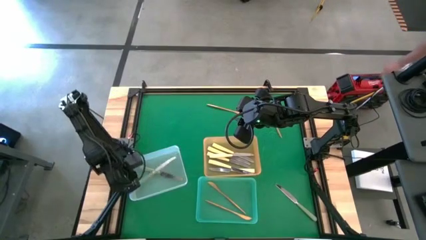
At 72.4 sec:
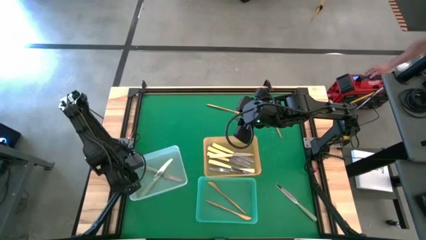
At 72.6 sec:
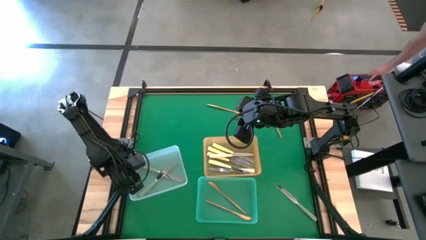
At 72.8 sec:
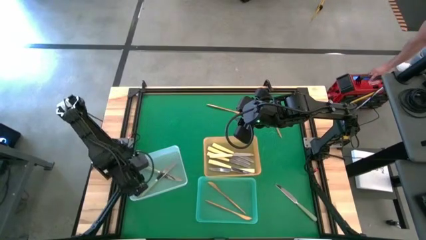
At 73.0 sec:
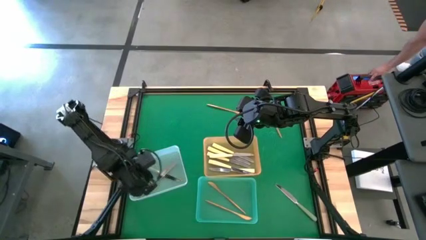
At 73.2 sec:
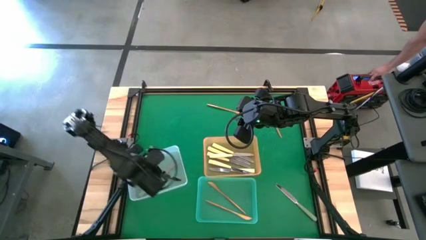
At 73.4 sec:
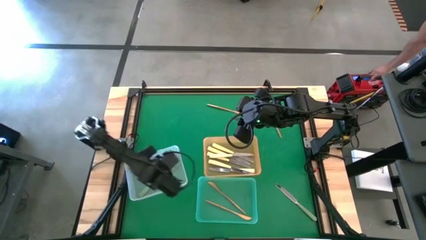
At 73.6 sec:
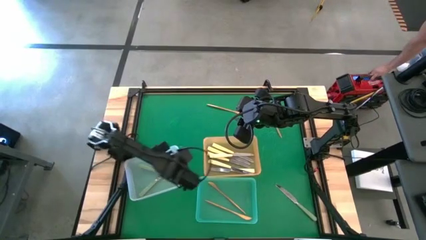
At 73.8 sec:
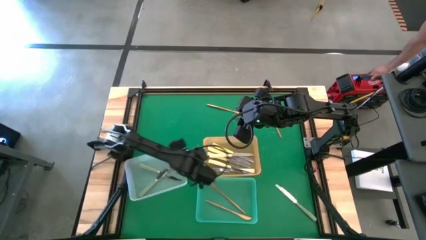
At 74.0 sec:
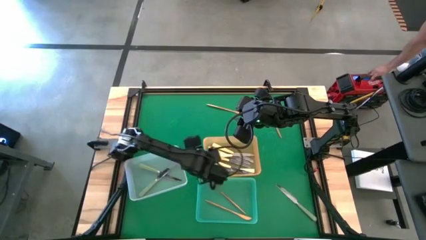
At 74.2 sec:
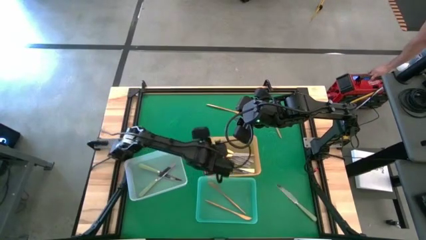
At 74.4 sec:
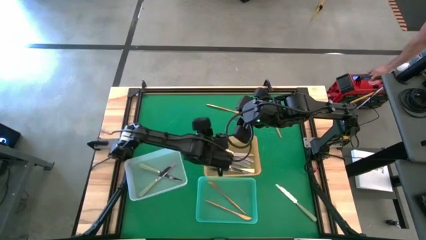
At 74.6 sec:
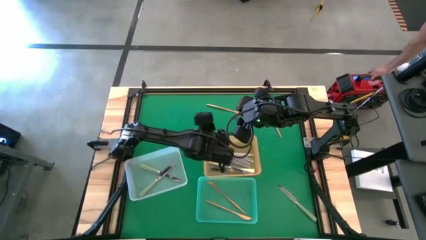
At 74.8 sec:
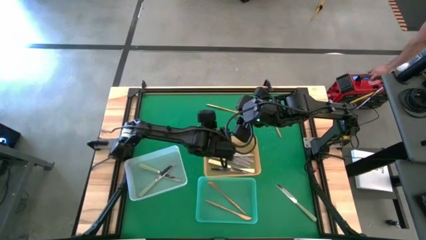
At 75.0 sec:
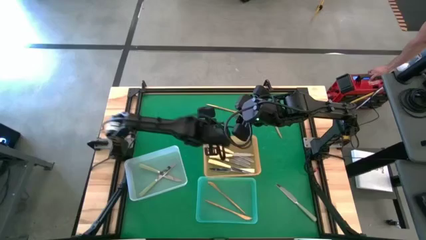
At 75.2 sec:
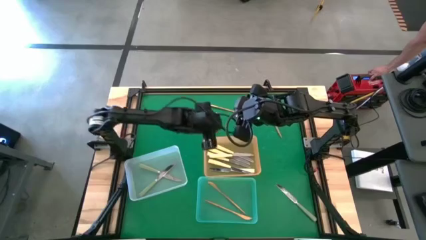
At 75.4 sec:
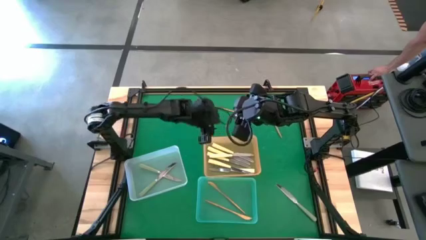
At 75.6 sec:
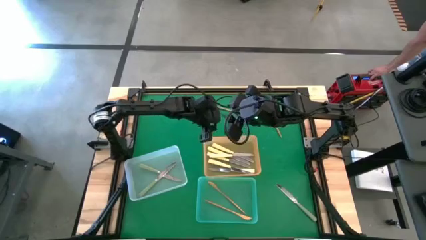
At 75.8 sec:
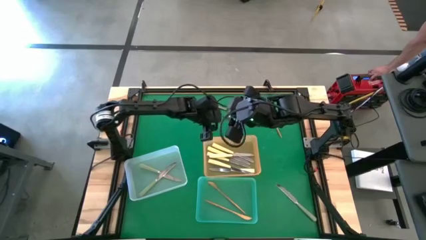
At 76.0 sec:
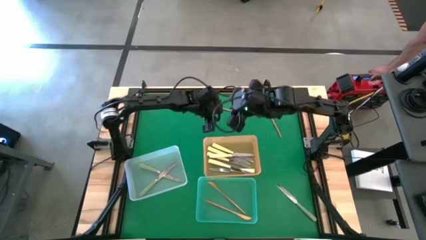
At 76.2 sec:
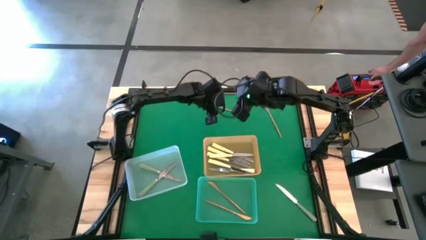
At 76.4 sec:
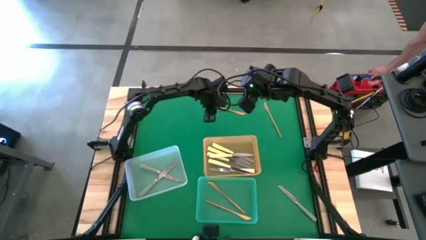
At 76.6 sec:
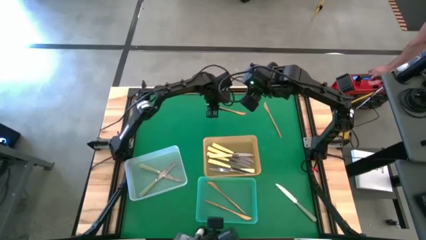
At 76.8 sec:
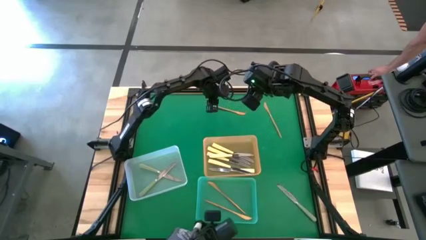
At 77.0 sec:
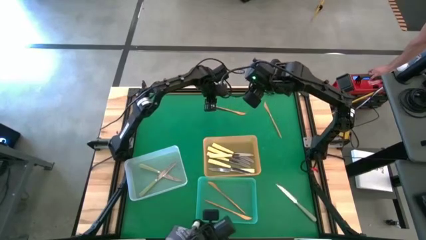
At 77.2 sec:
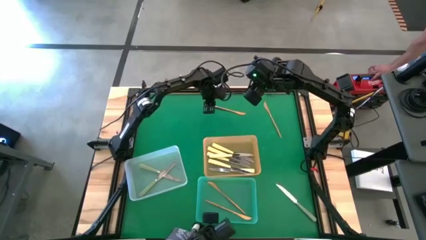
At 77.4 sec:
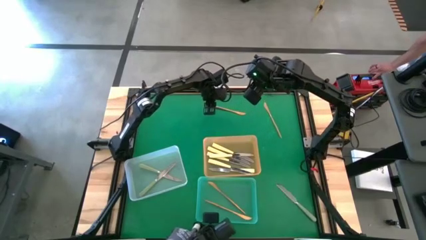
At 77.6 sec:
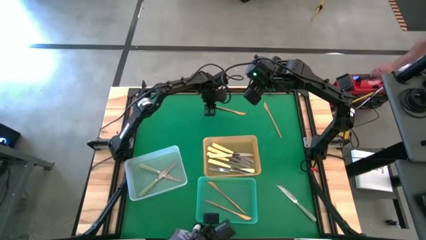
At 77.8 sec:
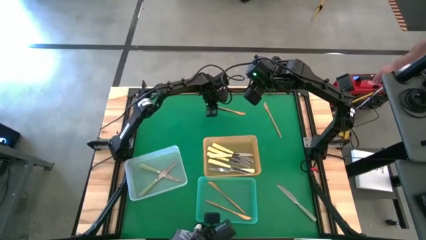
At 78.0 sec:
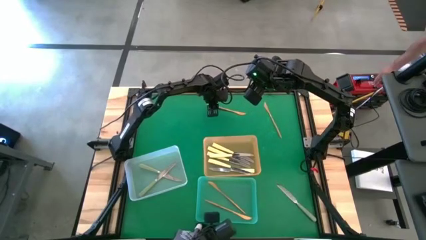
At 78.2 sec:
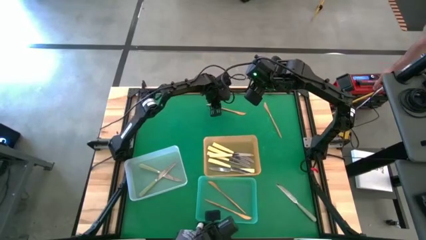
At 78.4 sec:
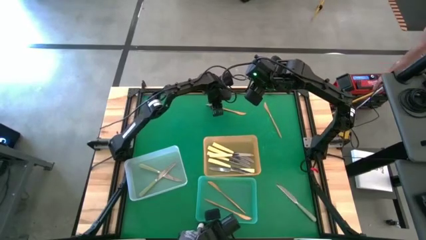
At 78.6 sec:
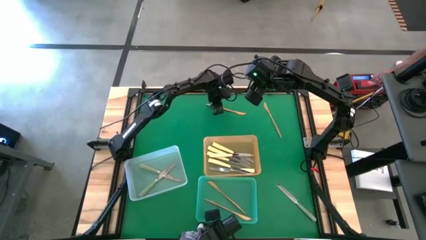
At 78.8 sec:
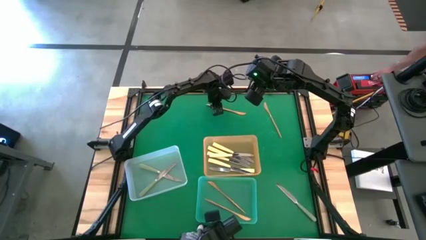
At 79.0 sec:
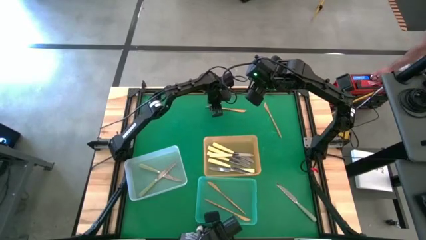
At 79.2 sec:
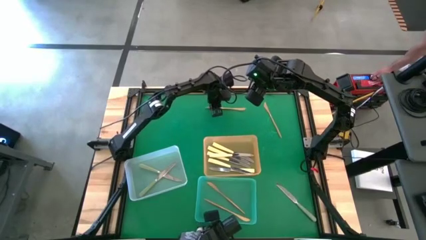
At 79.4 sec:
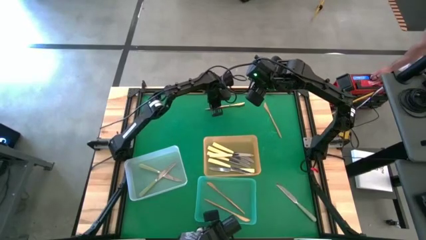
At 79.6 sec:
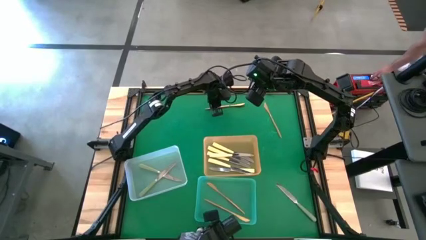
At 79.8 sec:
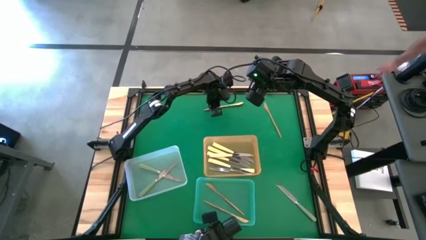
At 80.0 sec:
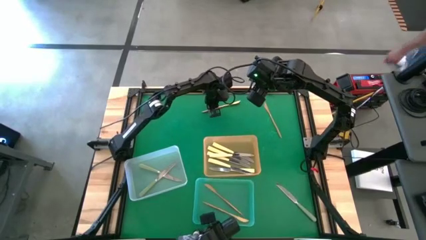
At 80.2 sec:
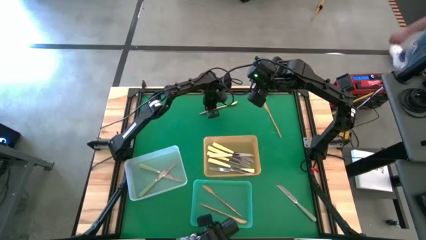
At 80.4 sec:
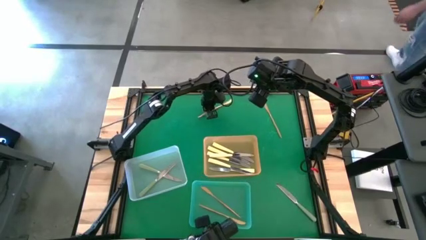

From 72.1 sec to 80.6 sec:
Task: Sort silverware by color (type)
Put the gold table knife into the blue bin

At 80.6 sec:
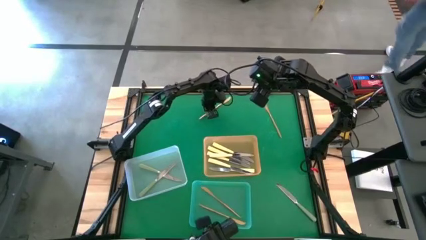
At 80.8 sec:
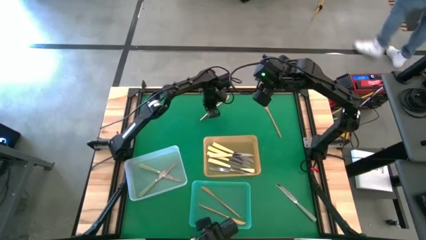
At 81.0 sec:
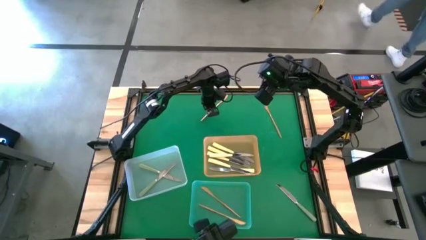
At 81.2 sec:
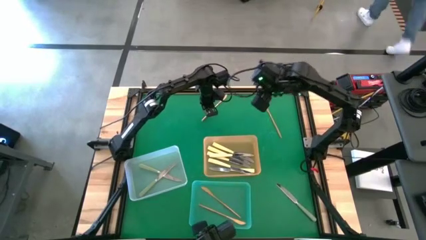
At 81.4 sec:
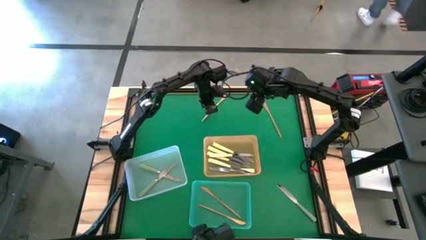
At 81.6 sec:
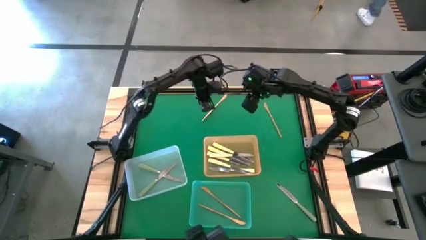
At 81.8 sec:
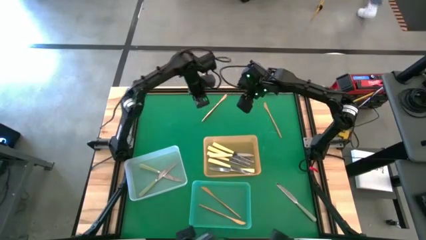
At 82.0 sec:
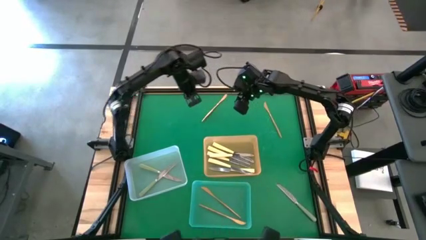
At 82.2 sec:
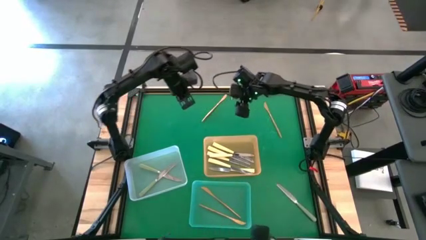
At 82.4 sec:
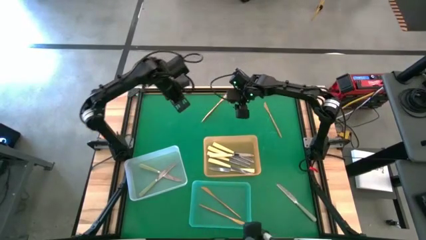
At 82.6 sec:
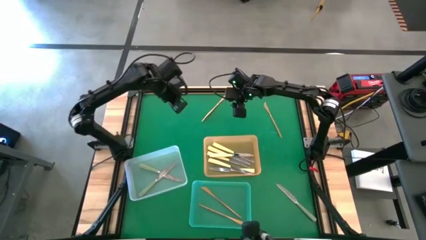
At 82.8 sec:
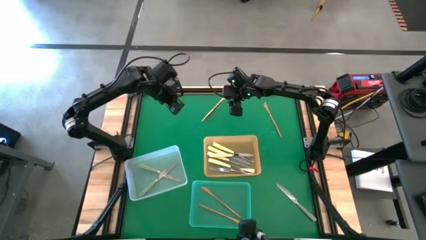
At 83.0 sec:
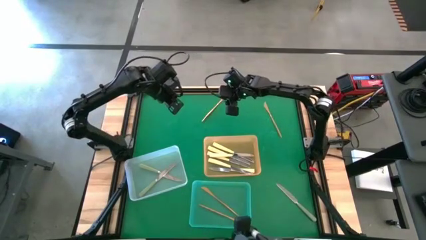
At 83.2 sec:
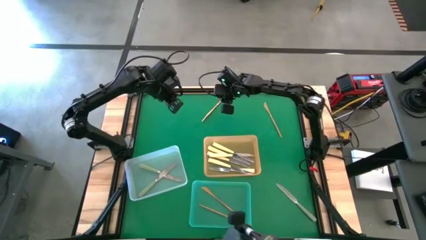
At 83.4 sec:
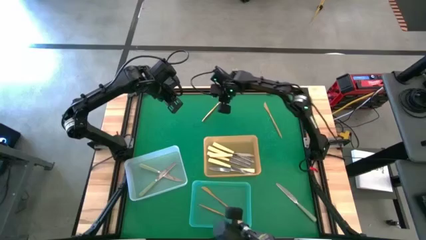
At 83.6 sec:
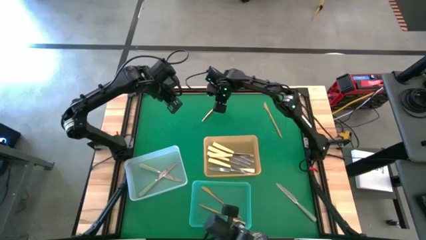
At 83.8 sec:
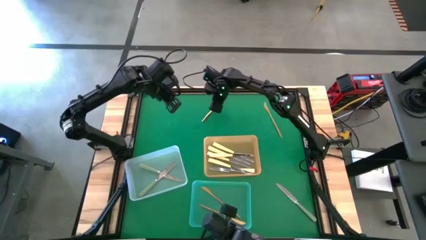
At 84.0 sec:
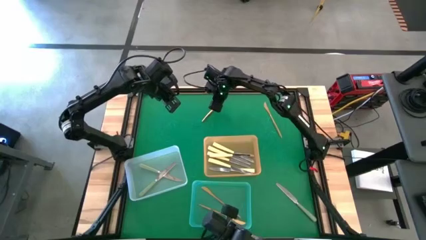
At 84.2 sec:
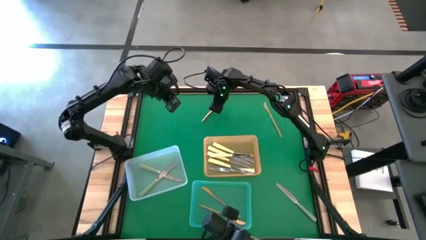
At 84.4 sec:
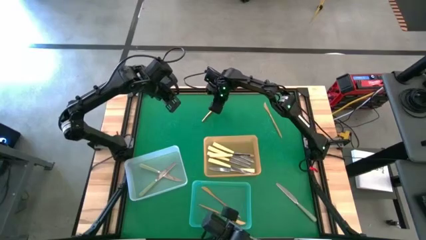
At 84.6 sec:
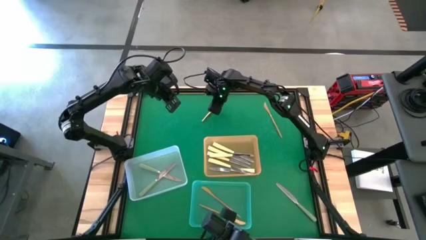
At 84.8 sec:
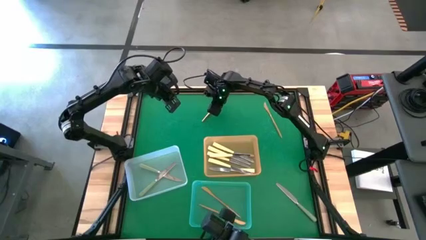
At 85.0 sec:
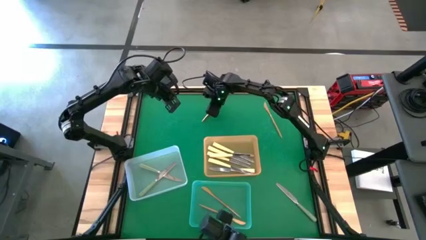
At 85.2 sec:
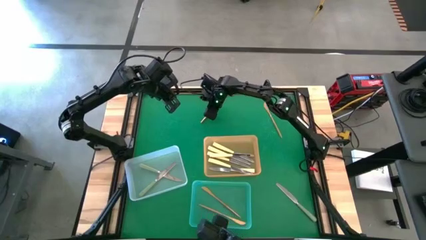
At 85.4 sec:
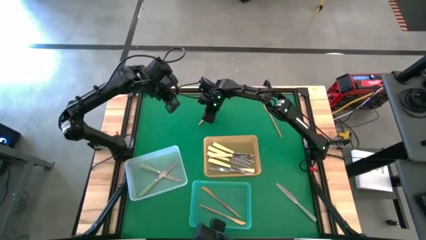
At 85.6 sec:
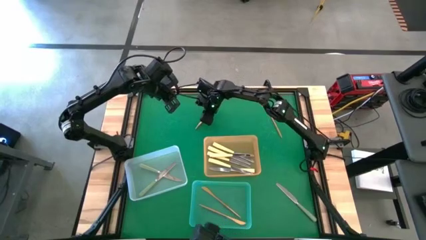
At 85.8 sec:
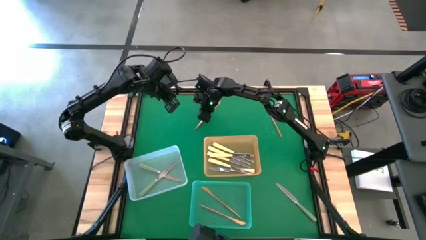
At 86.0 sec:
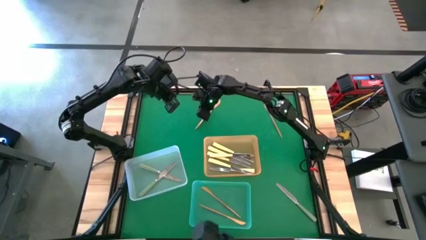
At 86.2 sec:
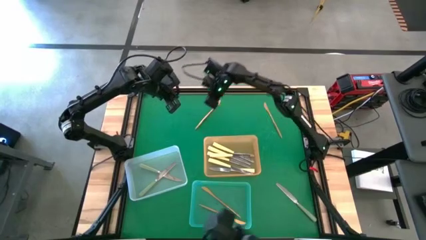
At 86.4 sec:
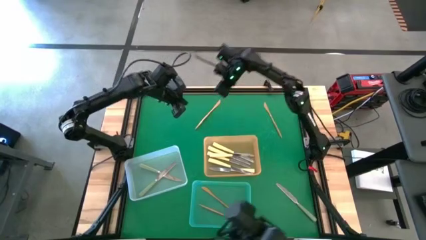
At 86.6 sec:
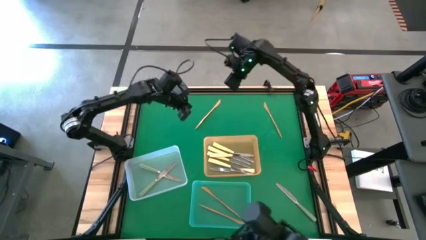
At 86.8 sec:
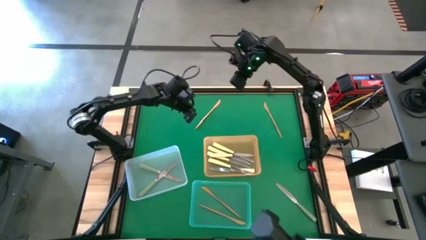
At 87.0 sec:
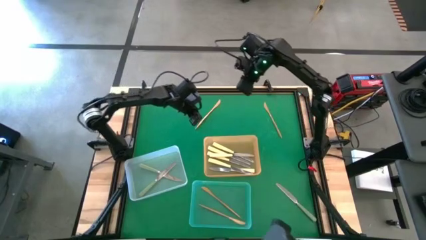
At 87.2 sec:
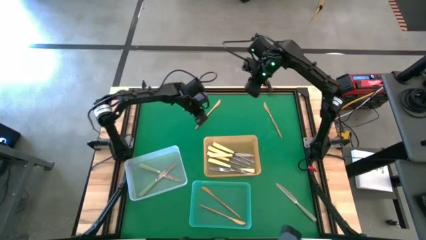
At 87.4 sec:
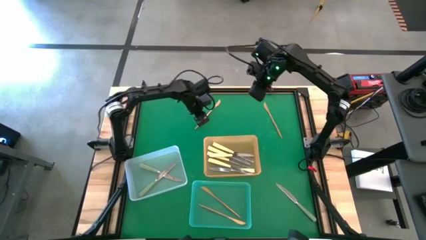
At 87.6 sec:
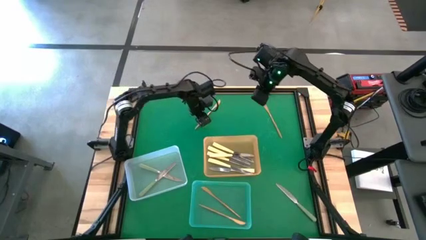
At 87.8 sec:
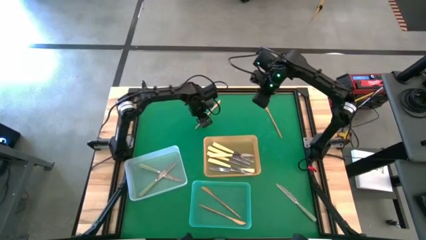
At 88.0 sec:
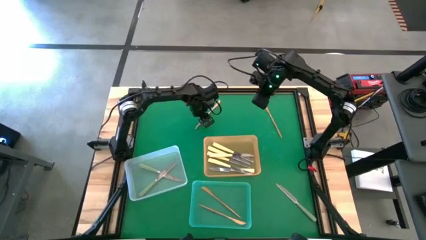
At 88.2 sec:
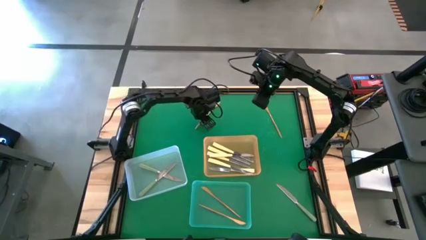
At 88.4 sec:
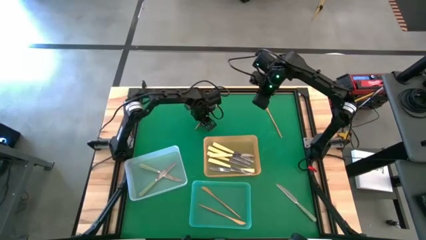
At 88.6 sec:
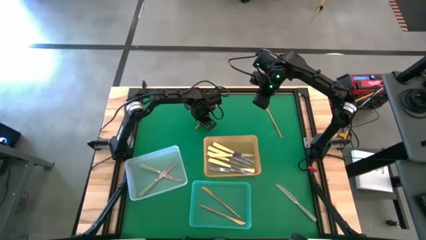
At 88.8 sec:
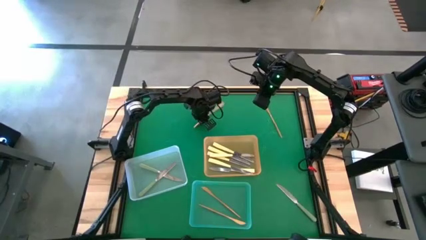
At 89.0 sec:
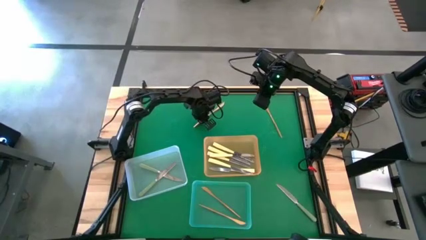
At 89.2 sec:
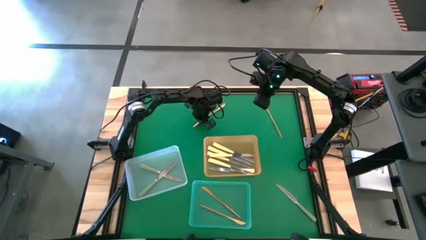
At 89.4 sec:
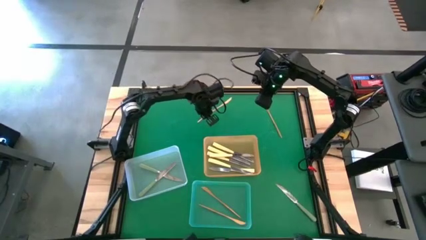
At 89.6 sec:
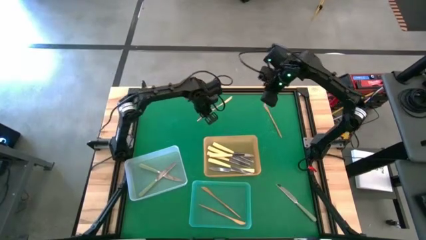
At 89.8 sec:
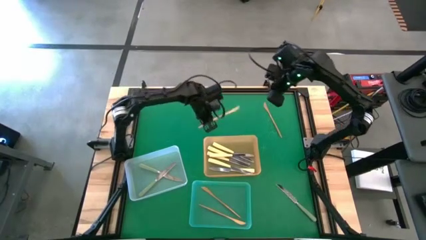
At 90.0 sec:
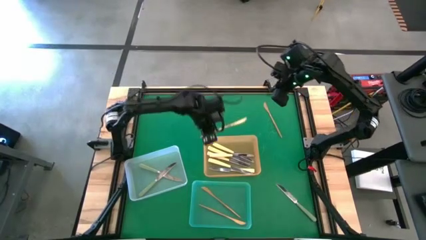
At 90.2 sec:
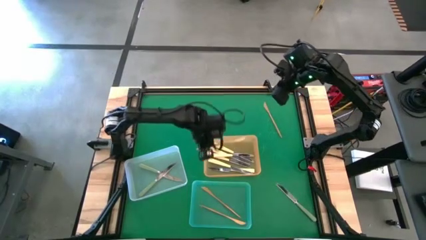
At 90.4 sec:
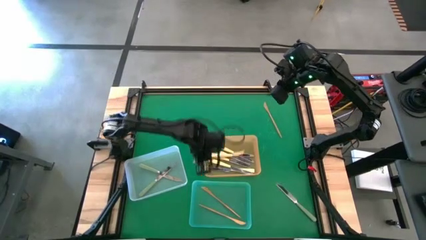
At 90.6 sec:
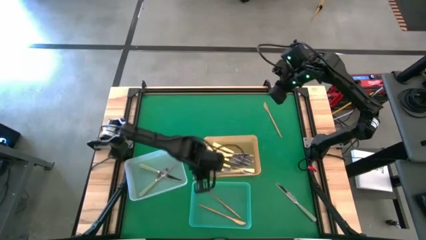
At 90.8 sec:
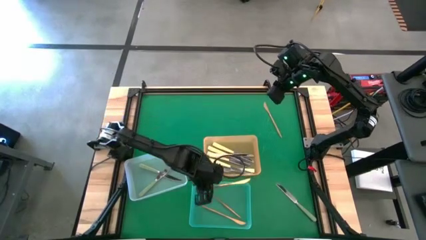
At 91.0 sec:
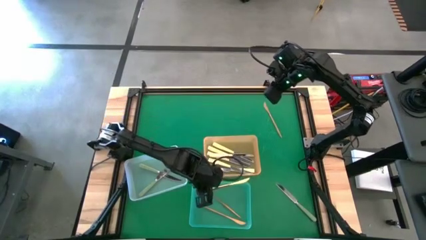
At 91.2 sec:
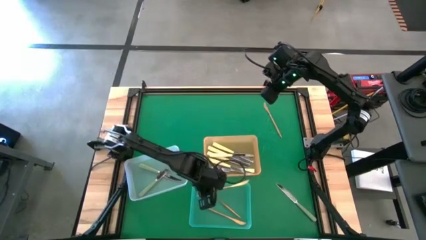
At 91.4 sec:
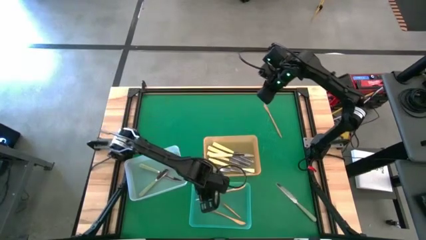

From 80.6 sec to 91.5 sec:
Put the gold table knife into the blue bin
